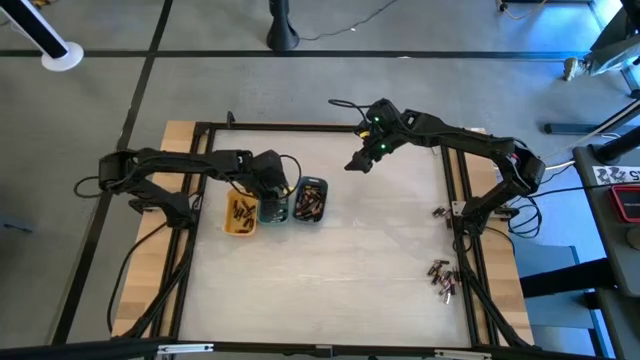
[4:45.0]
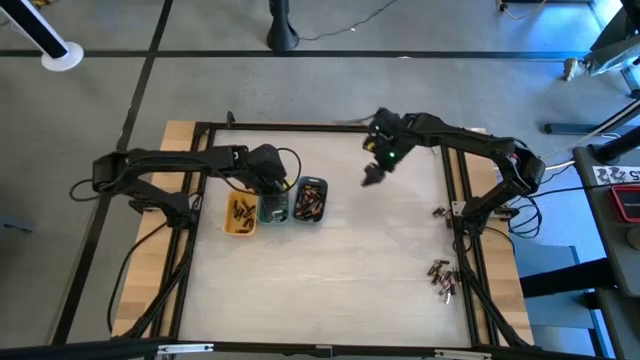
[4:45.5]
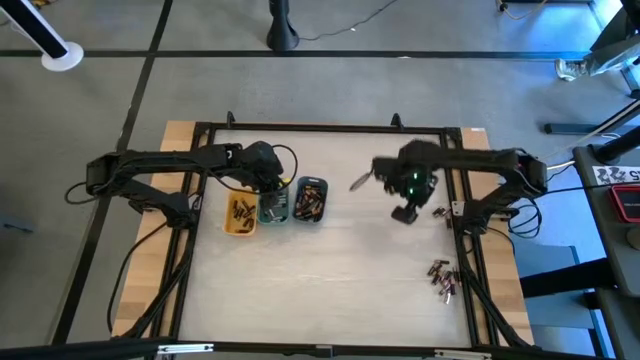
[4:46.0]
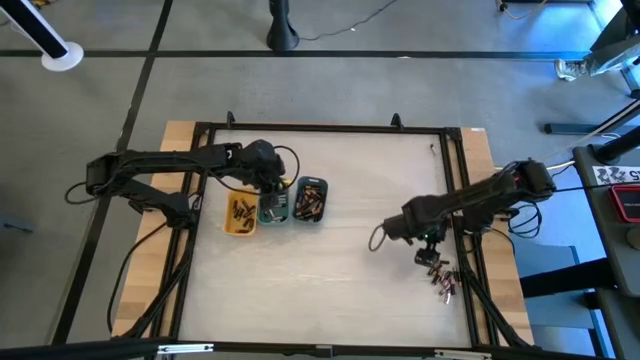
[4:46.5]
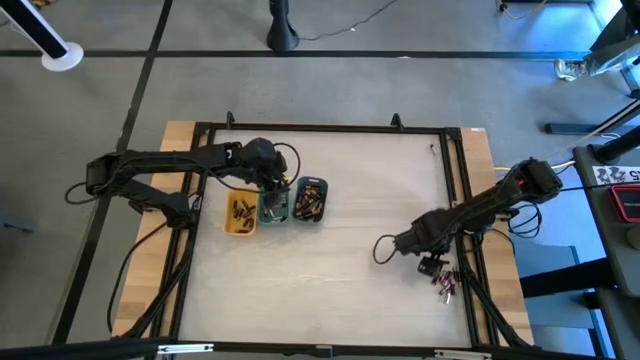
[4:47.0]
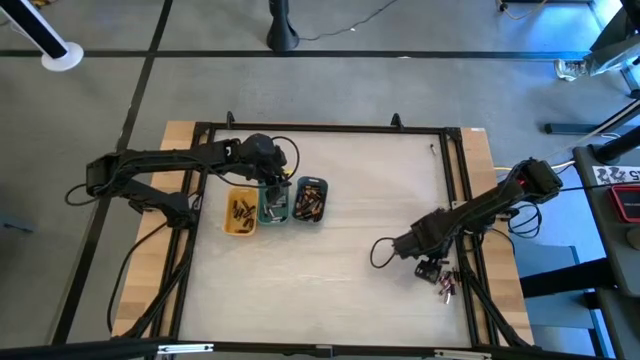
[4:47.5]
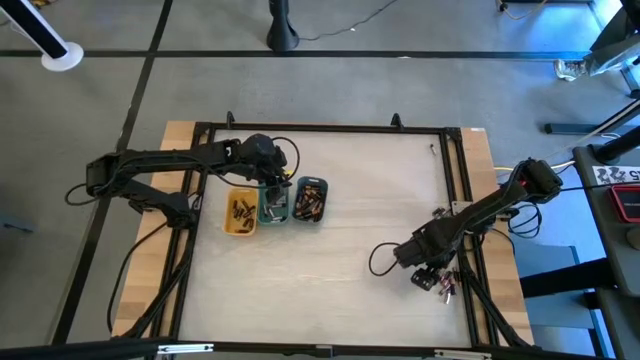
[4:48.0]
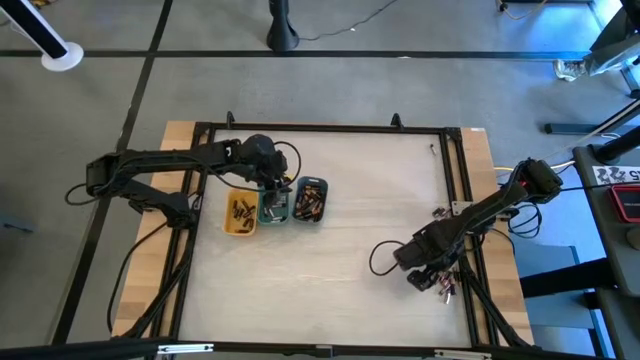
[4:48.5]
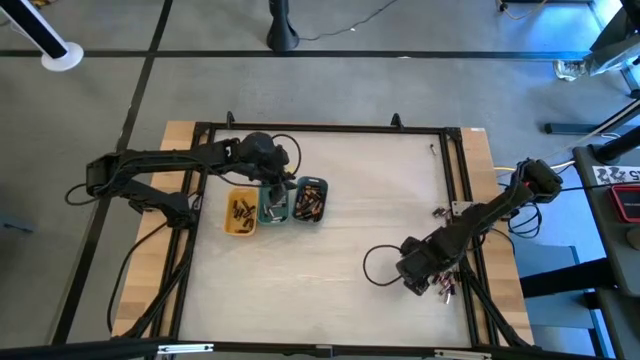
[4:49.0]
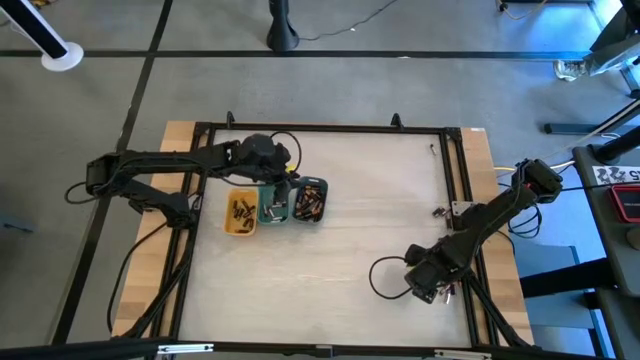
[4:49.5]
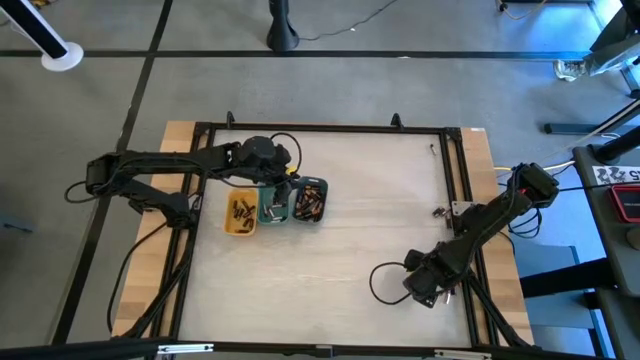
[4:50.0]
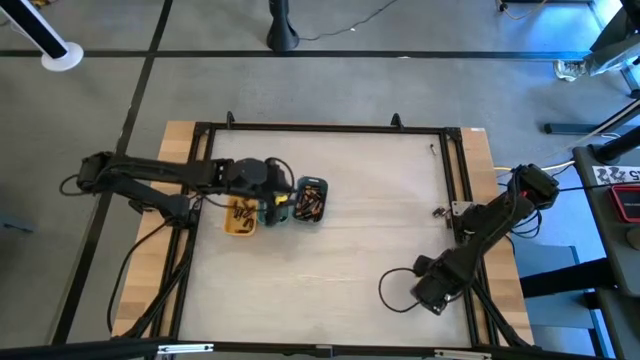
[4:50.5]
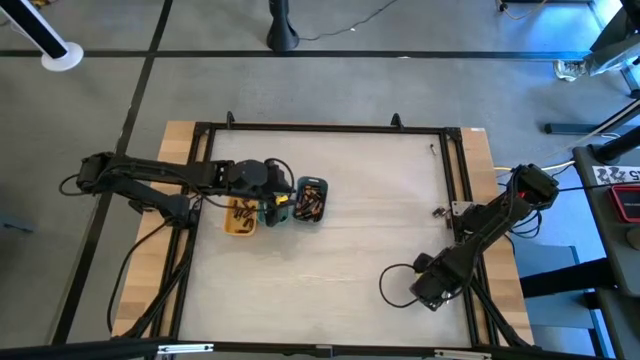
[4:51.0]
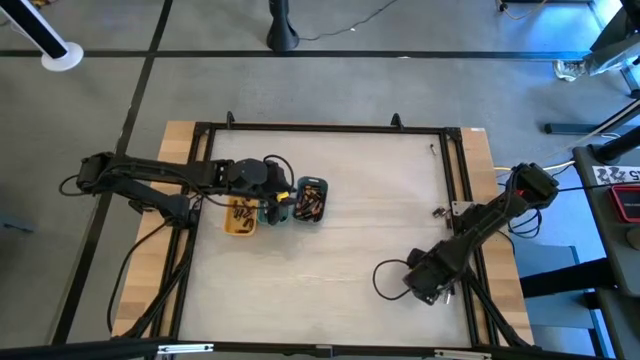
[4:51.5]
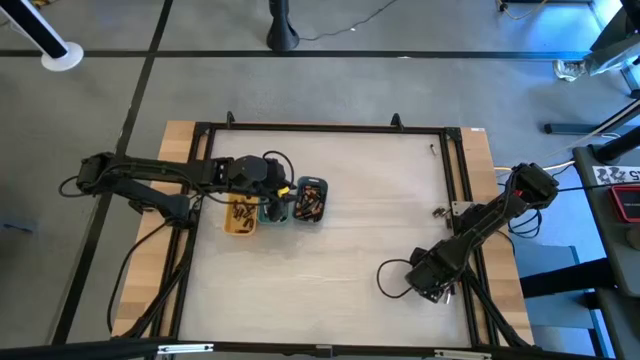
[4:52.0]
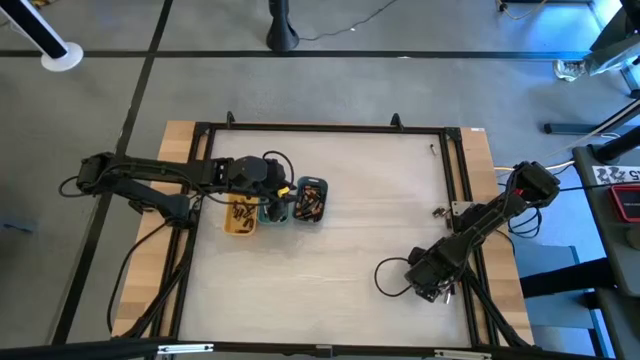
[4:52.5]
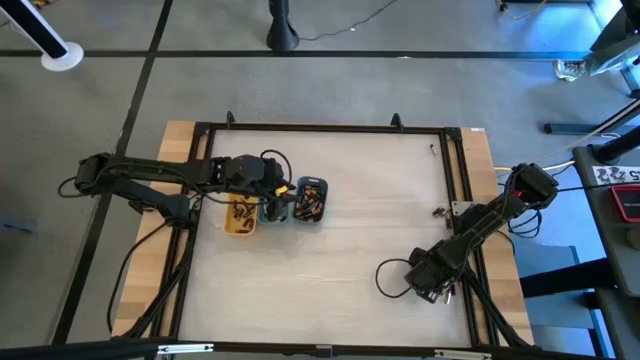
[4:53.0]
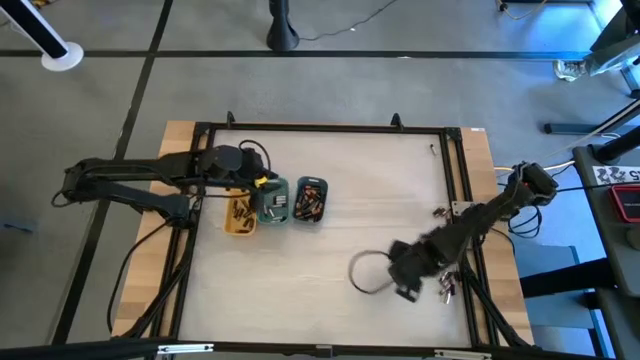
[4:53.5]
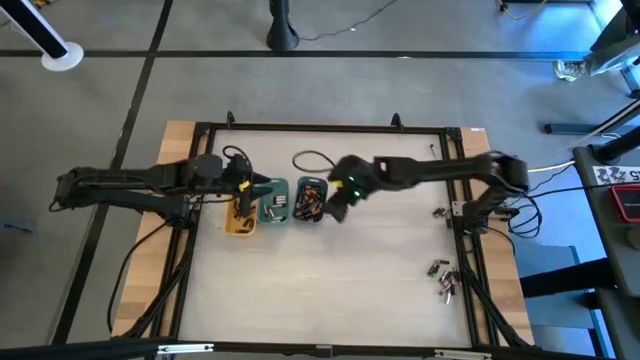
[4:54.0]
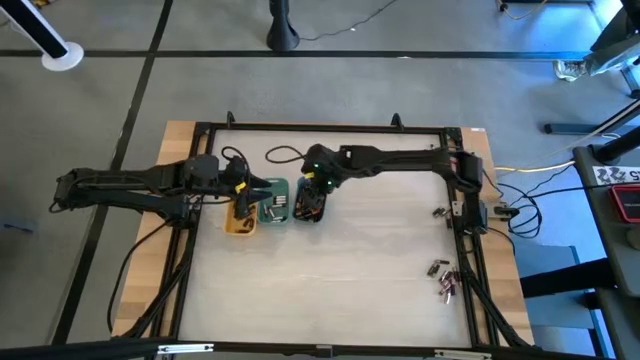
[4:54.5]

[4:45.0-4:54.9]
Task: Sort batteries
Put the large black battery into the blue bin

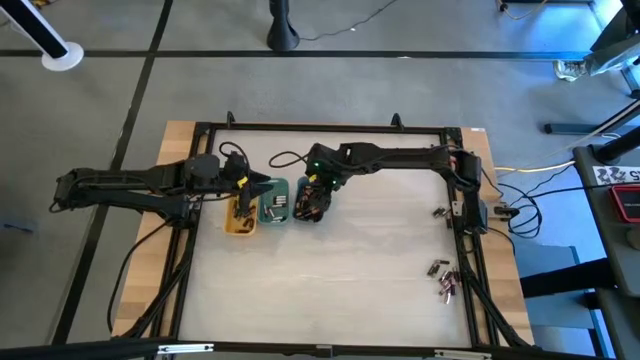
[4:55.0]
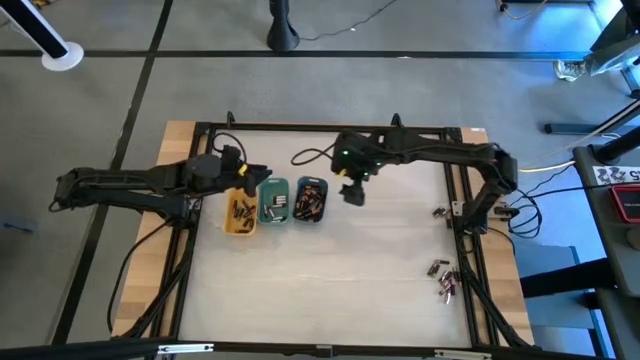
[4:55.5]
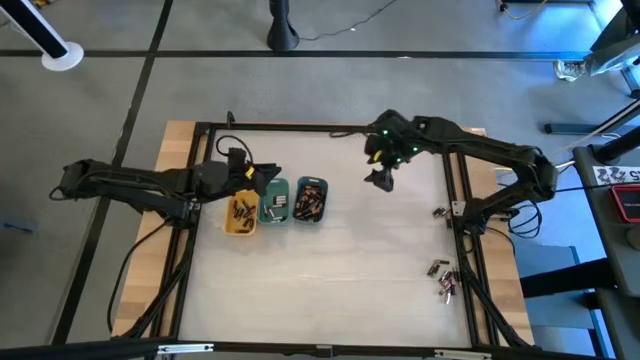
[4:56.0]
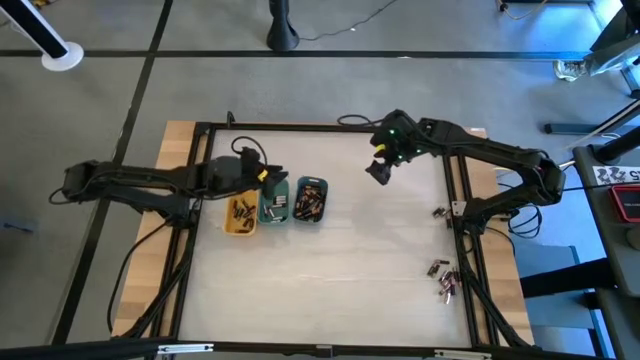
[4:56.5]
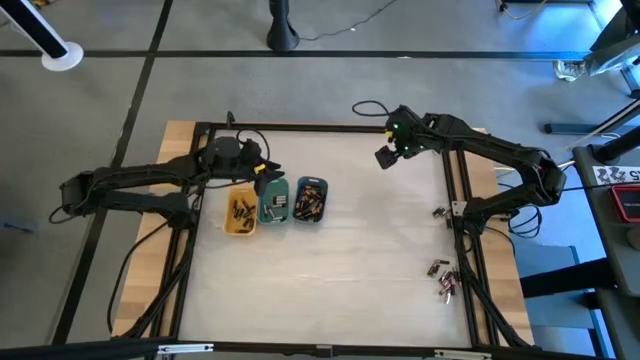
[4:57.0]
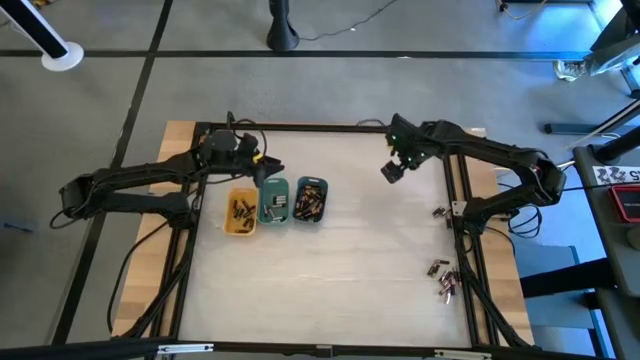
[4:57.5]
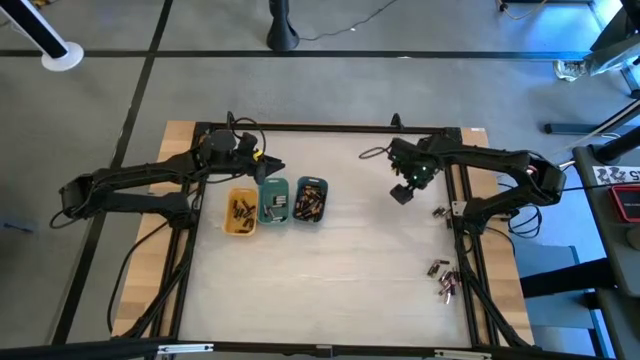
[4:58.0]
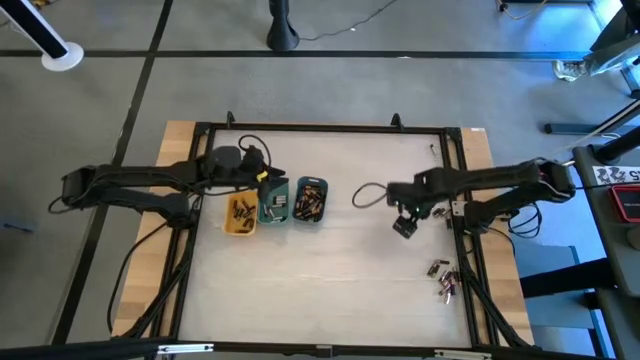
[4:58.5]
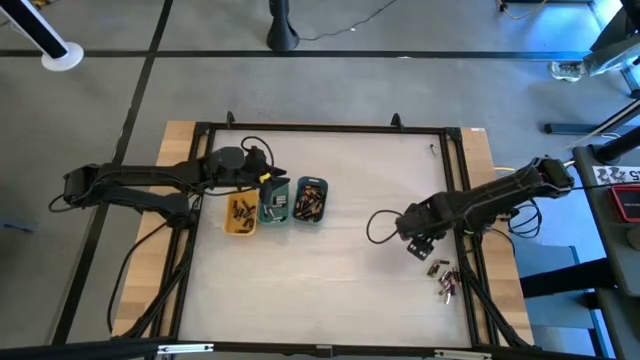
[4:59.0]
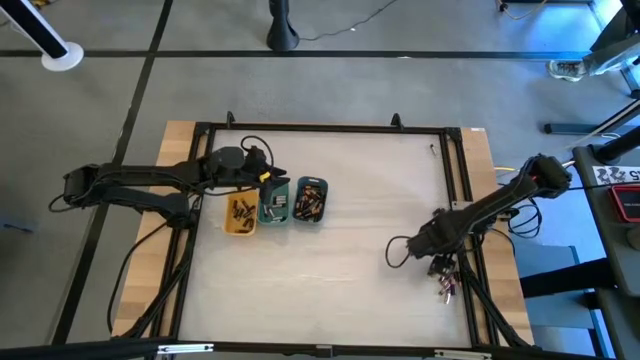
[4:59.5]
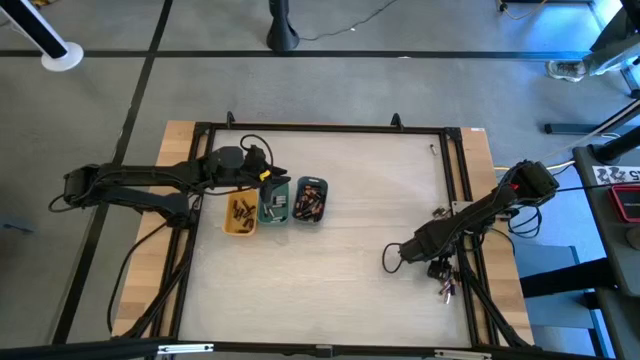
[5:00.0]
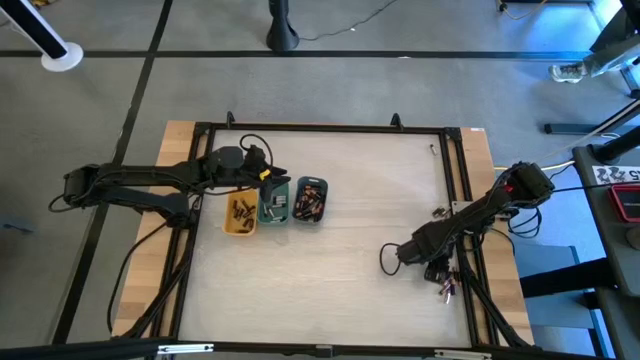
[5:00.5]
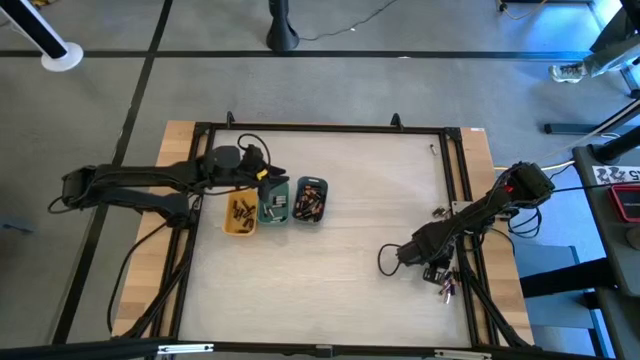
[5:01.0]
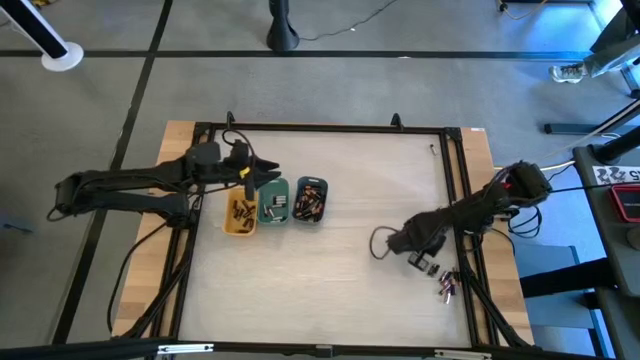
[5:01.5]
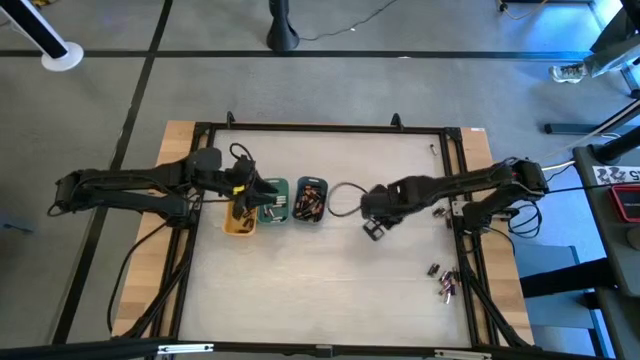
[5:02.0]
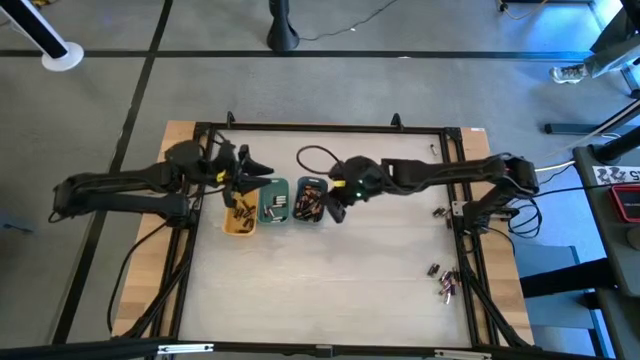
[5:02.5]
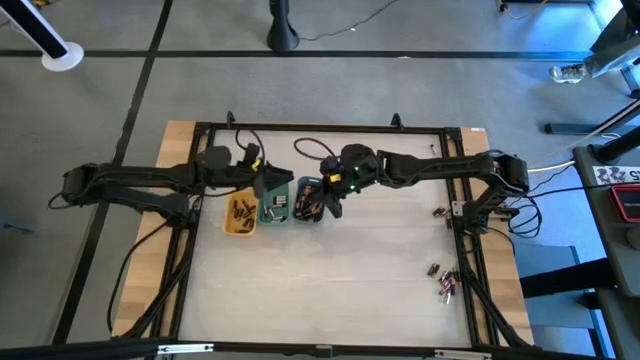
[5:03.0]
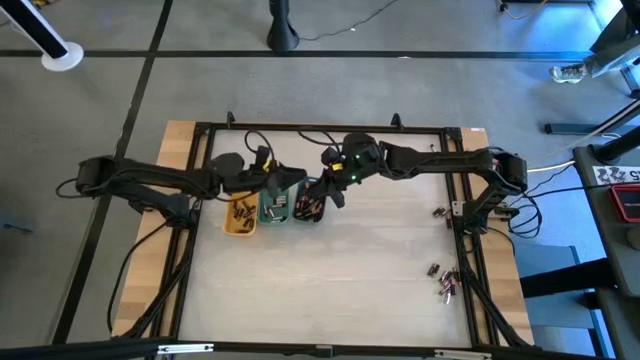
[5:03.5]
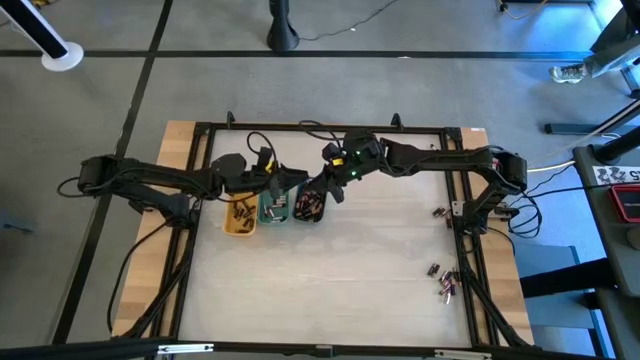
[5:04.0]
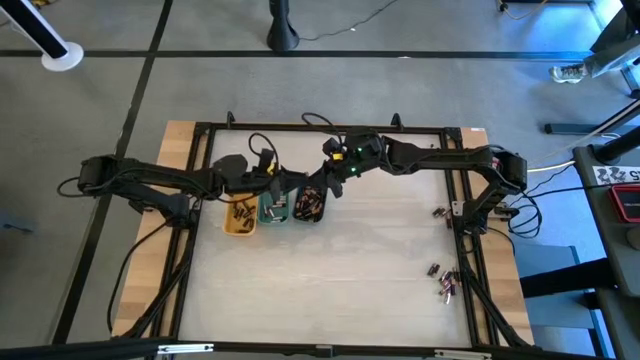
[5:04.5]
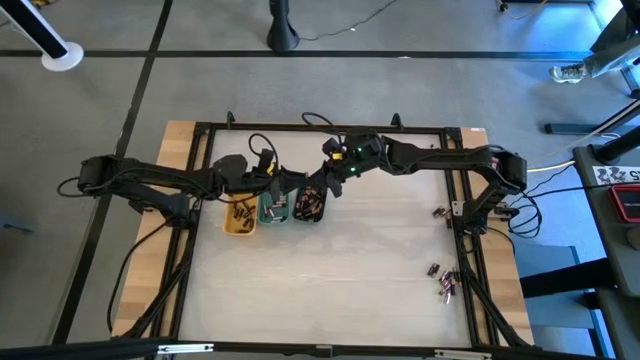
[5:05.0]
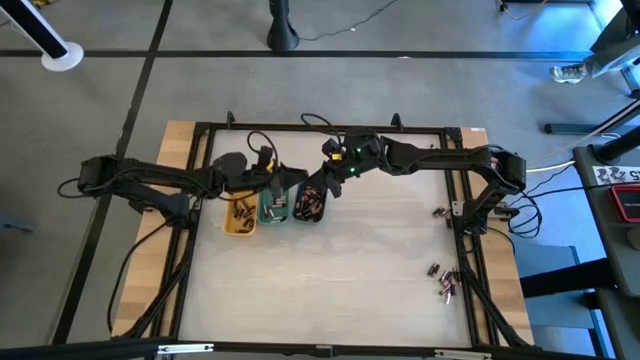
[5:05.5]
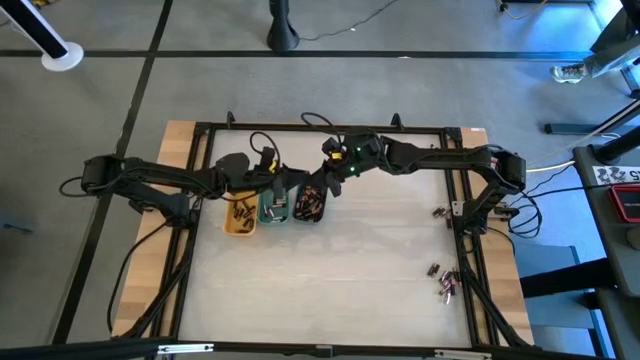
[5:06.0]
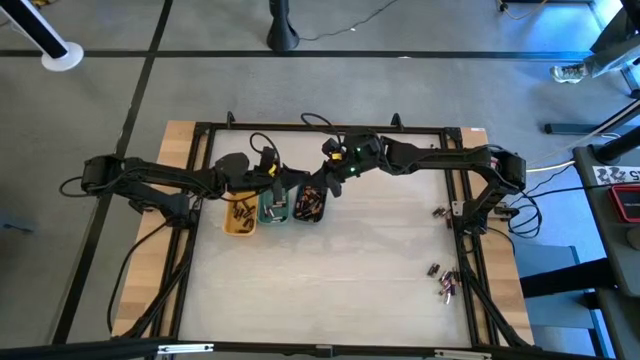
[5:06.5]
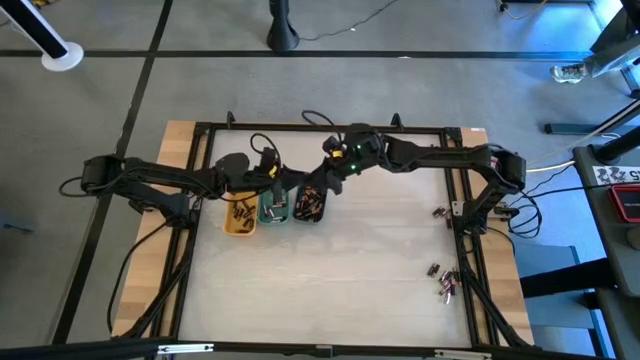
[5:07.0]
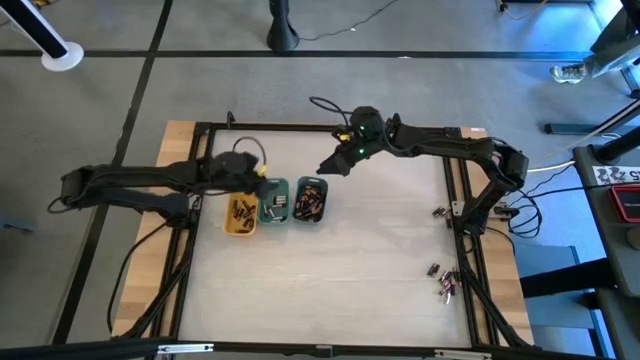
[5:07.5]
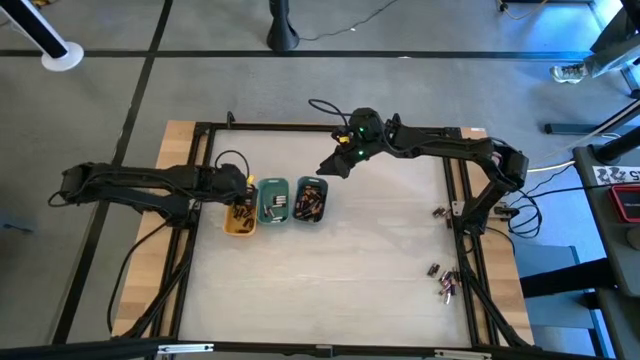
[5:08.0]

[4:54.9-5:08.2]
Put the small black battery into the yellow bin
